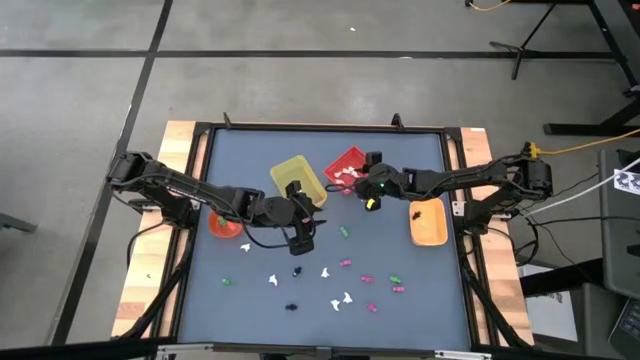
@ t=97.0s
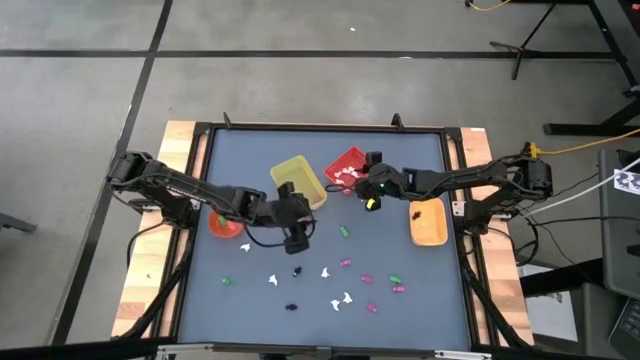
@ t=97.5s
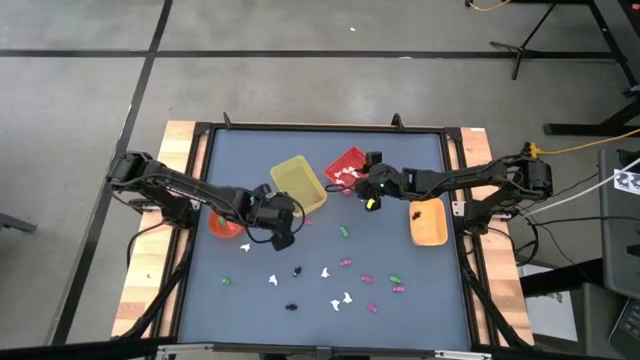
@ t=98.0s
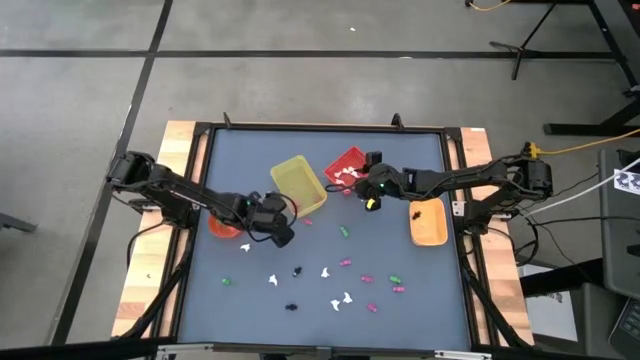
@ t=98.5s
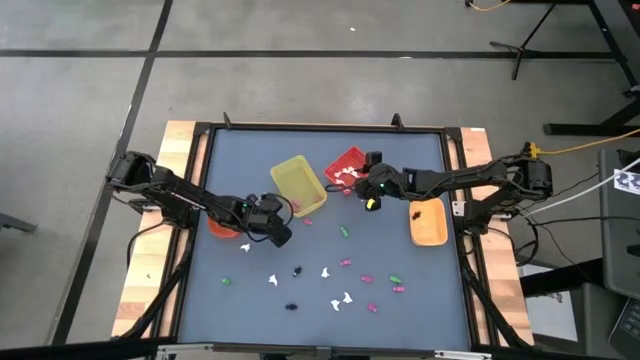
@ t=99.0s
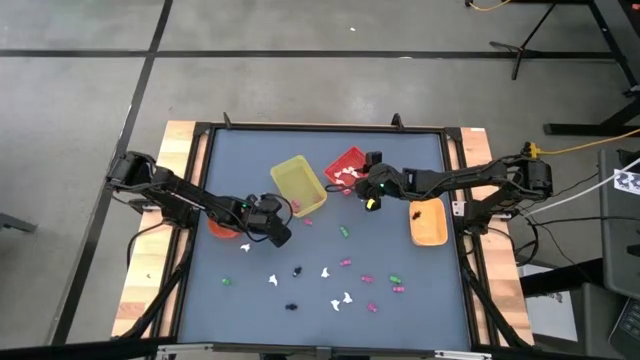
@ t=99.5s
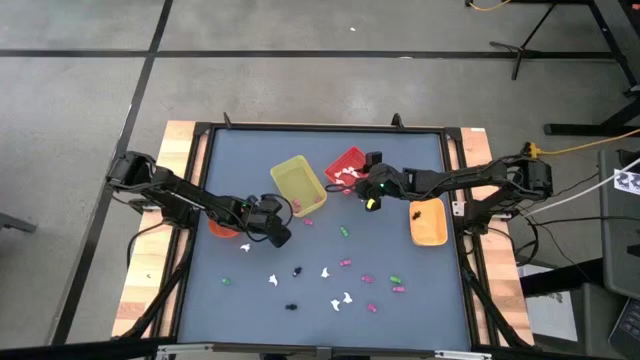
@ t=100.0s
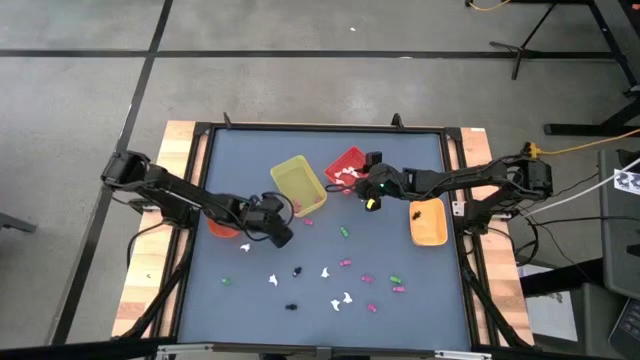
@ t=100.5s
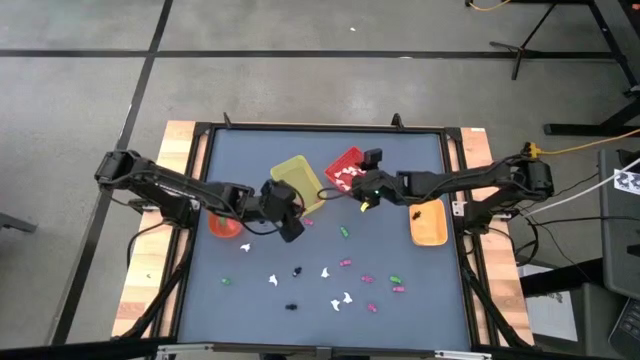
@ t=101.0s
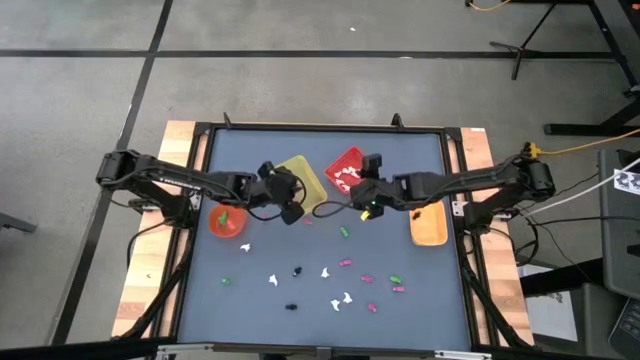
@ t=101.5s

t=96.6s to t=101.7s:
Task: Sort Halloween decoration
Put the pink skeleton toy into the yellow bin

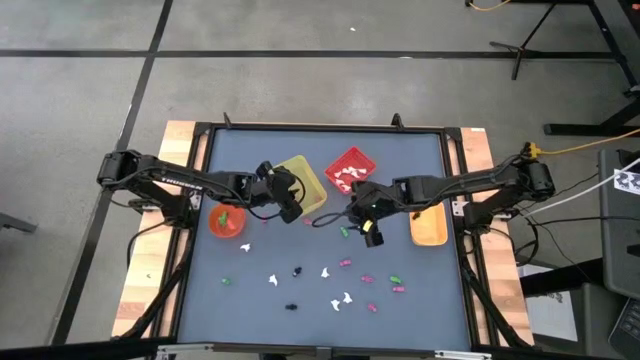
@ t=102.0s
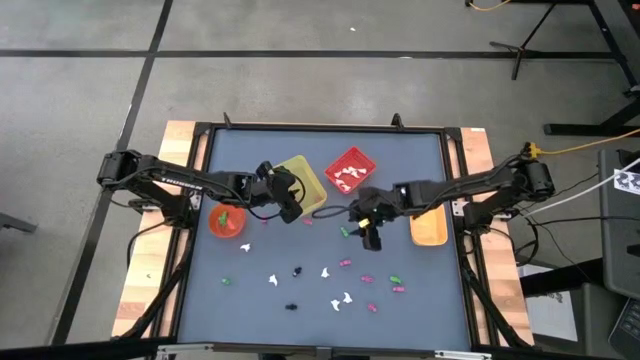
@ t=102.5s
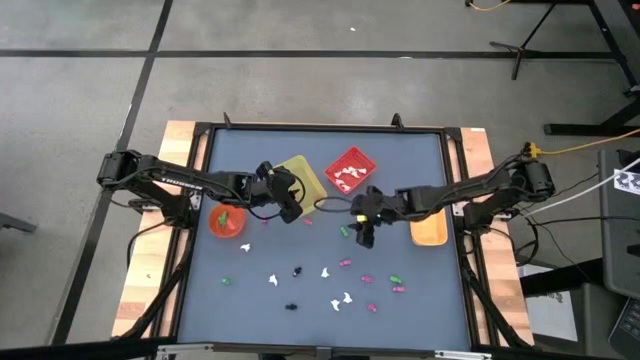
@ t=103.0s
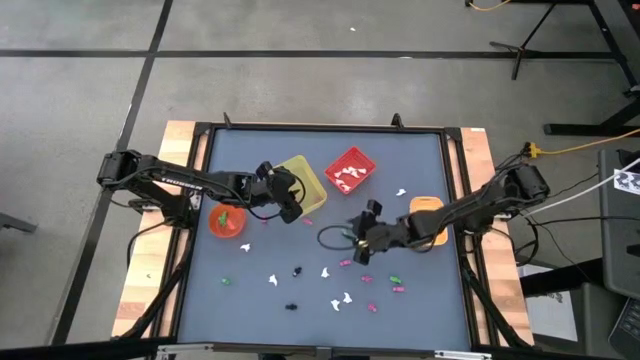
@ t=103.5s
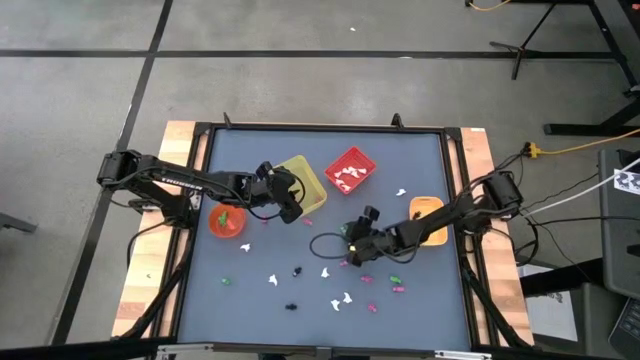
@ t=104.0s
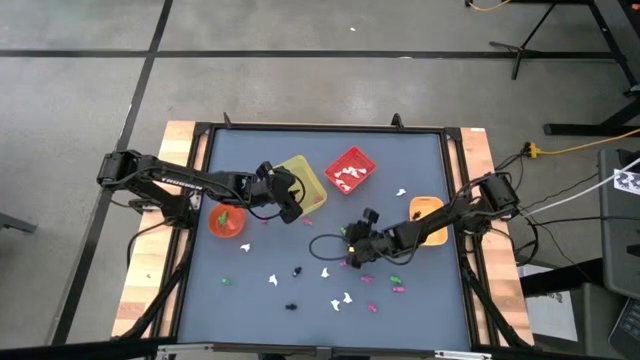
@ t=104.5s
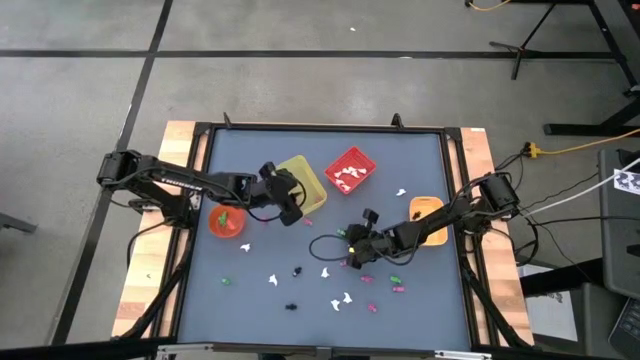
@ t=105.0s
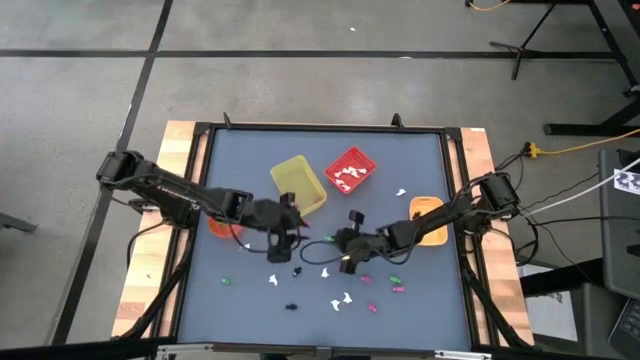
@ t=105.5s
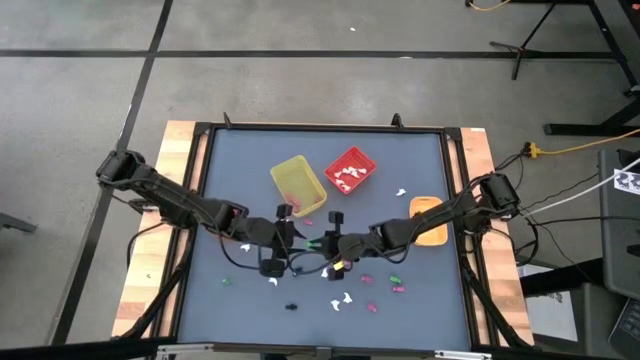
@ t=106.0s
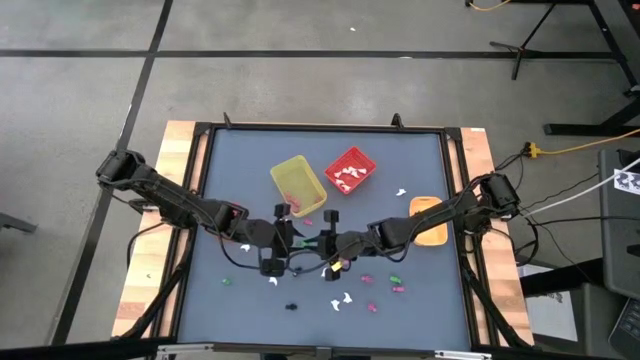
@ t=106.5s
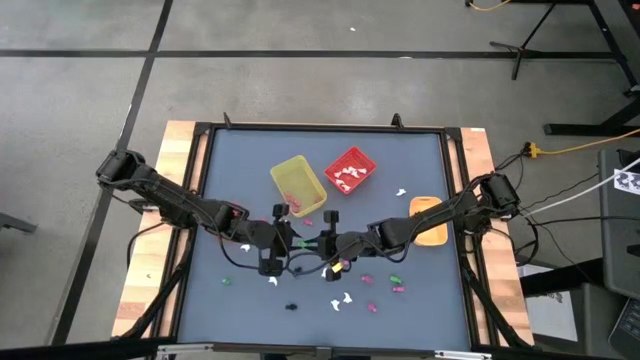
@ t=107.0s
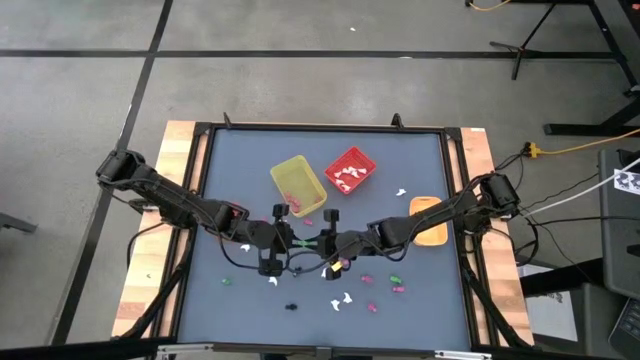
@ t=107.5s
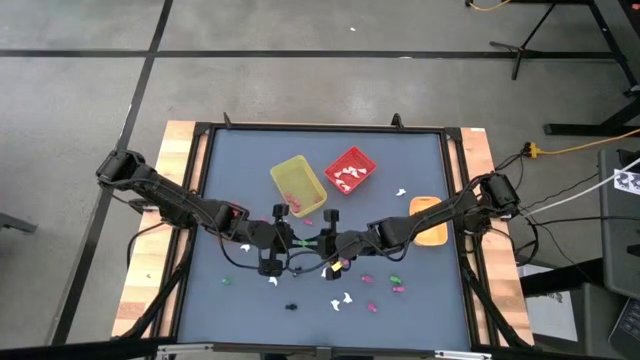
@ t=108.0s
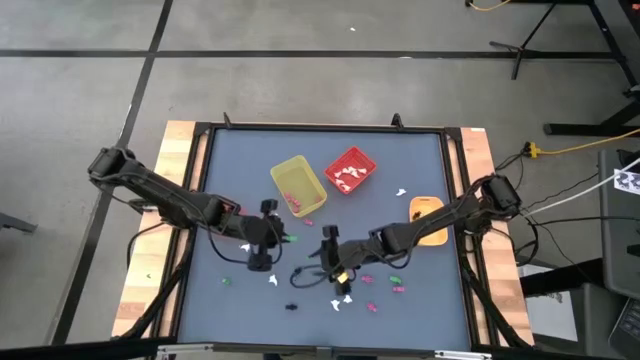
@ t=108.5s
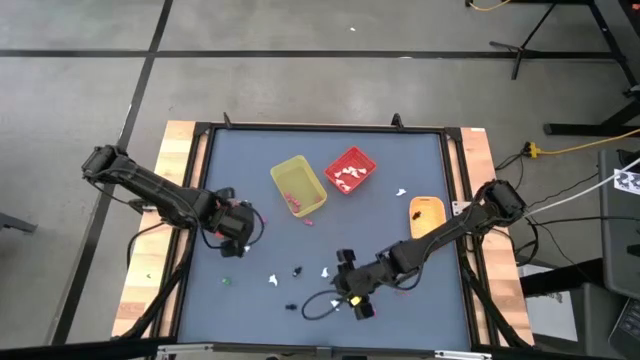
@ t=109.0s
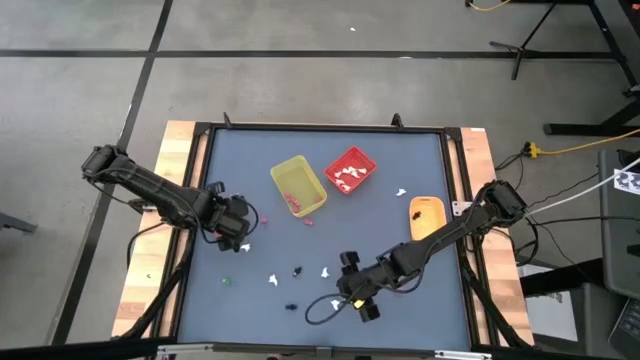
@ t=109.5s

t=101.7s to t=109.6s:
Put the green skeleton toy into the orange bin

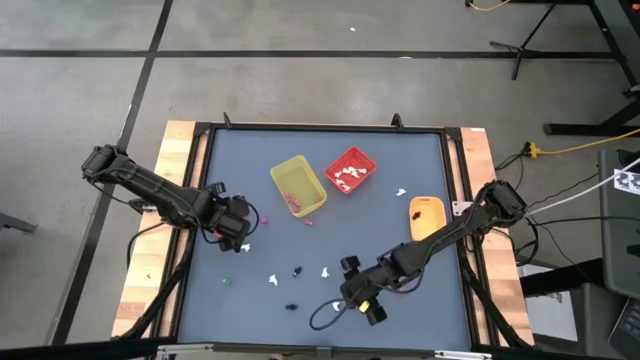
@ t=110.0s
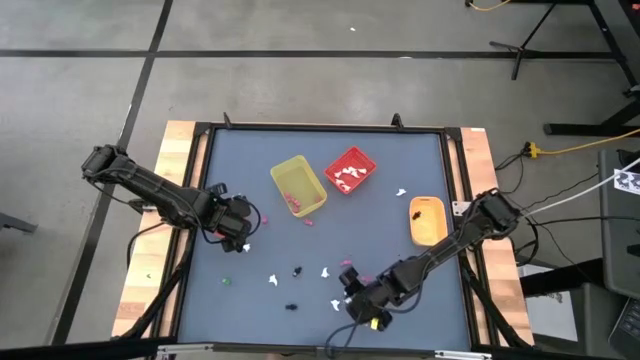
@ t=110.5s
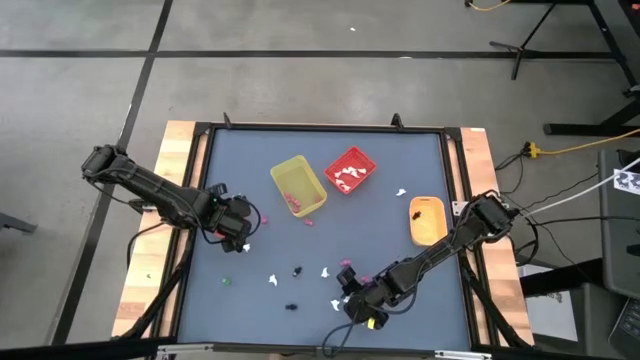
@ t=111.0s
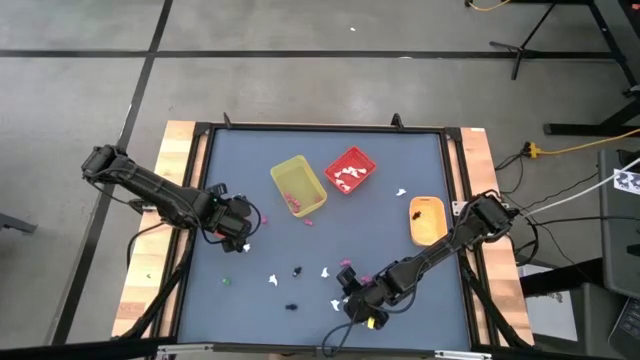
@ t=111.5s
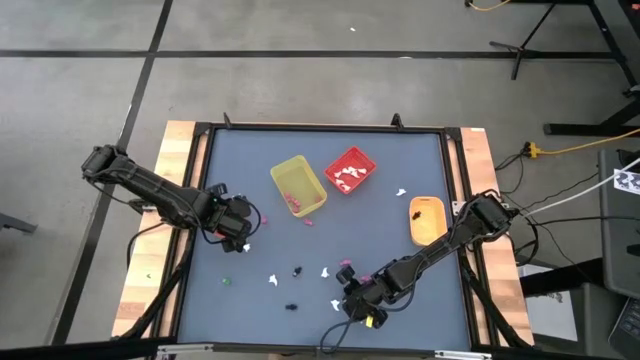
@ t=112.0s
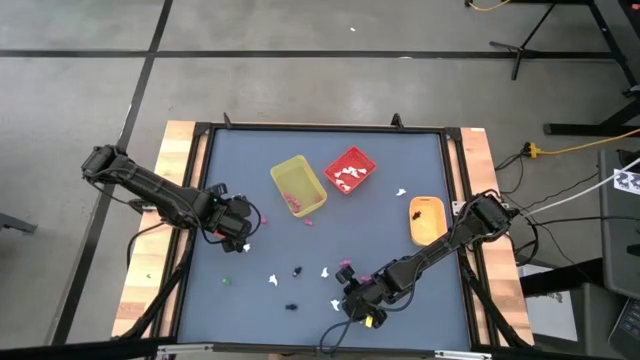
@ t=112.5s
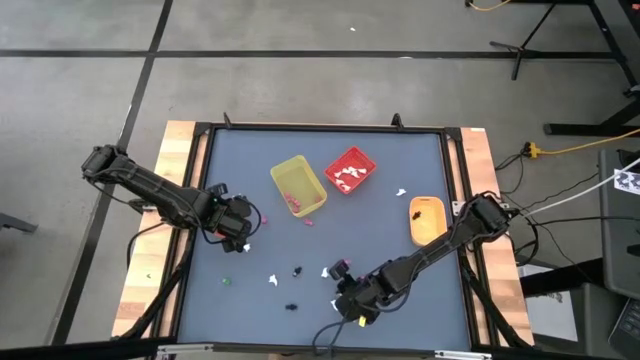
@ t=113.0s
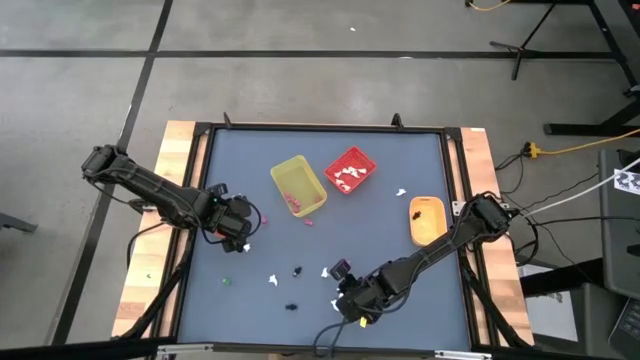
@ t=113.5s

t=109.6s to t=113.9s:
Put the white ghost toy into the red bin

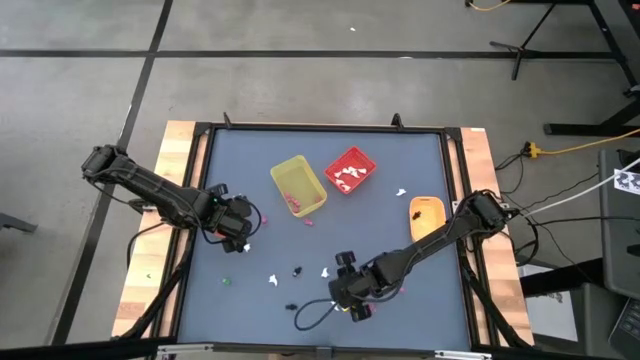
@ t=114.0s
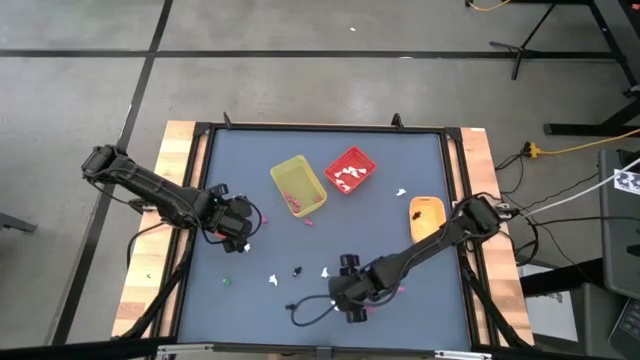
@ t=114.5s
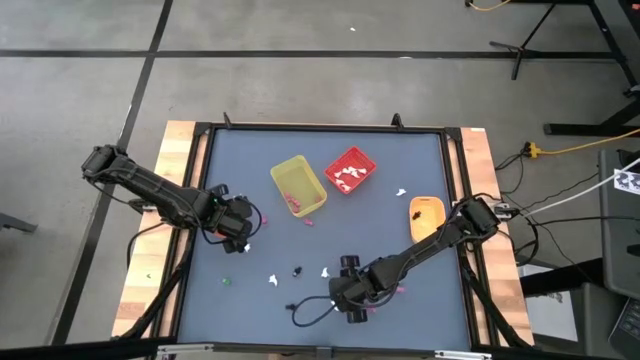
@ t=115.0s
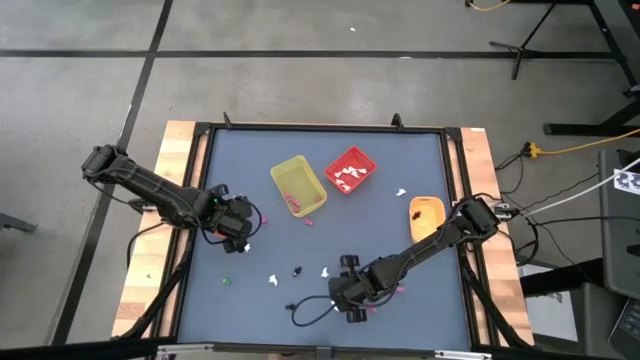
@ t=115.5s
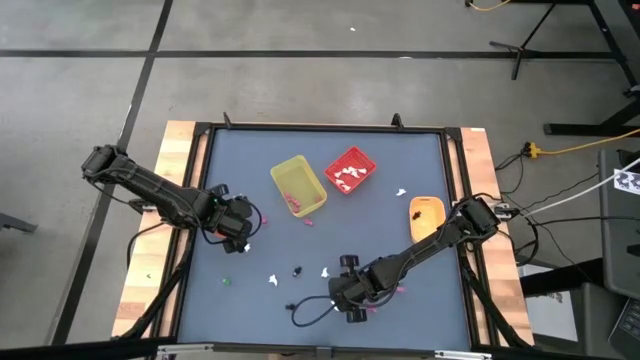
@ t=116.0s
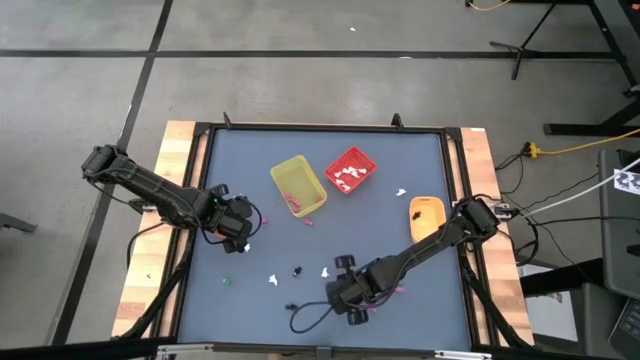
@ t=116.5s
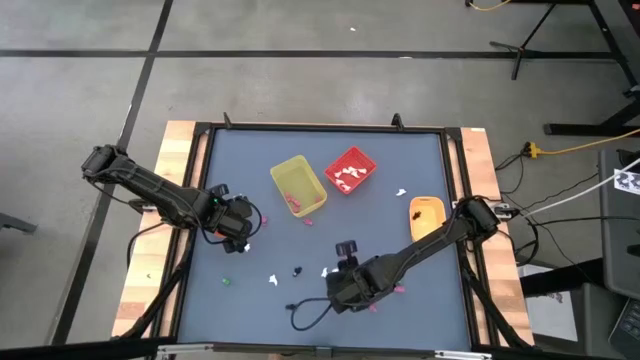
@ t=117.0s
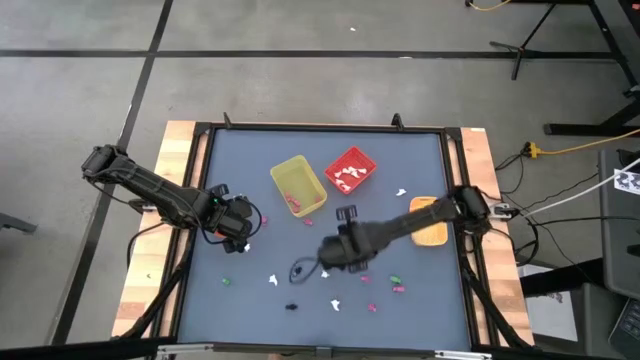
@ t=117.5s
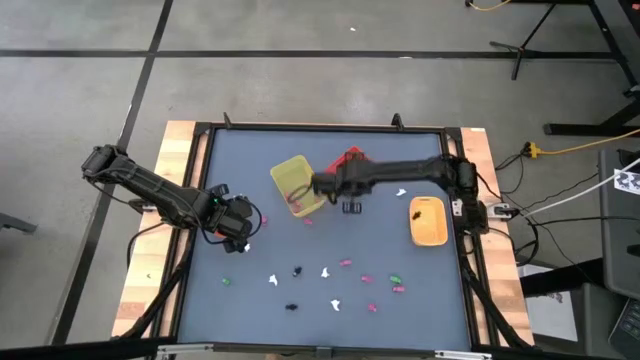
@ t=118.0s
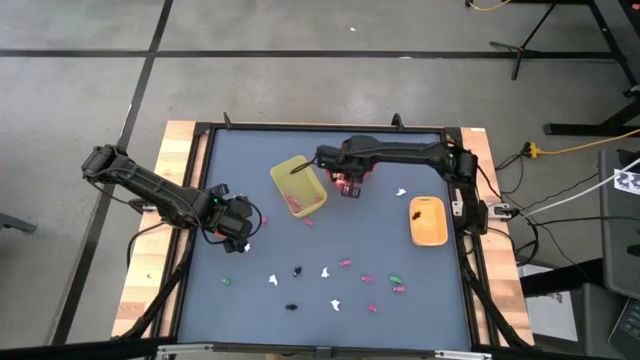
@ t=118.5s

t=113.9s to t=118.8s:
Put the white ghost toy into the red bin

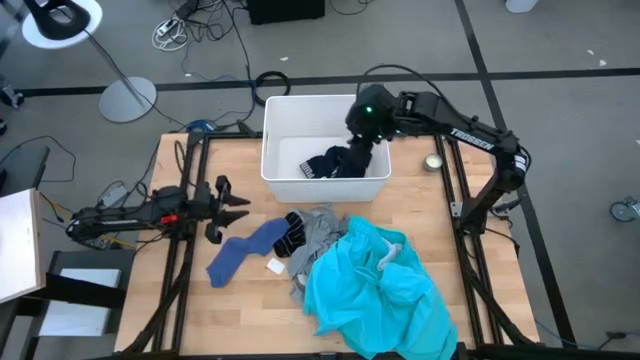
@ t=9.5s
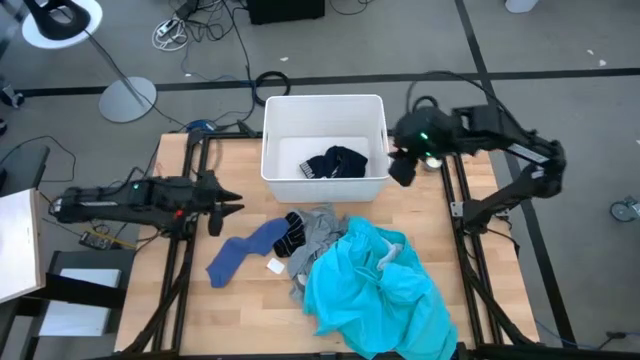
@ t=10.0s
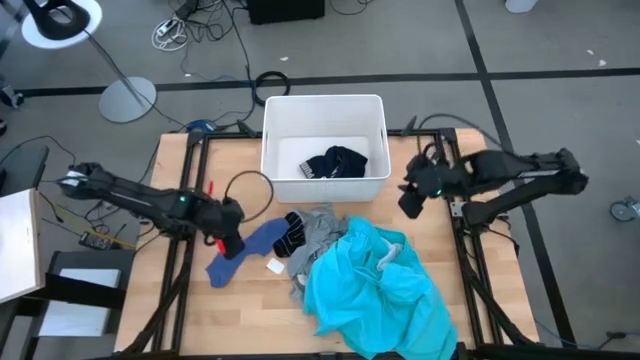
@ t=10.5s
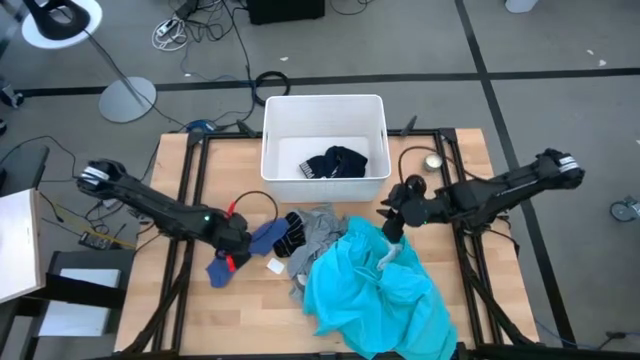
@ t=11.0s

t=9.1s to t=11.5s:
Task: Sort clothes
Put the bottom blue sock into the white bin
